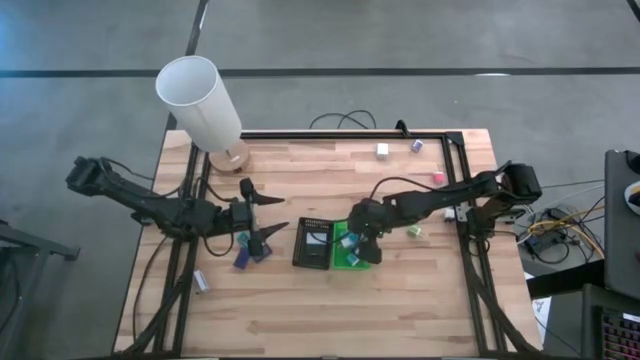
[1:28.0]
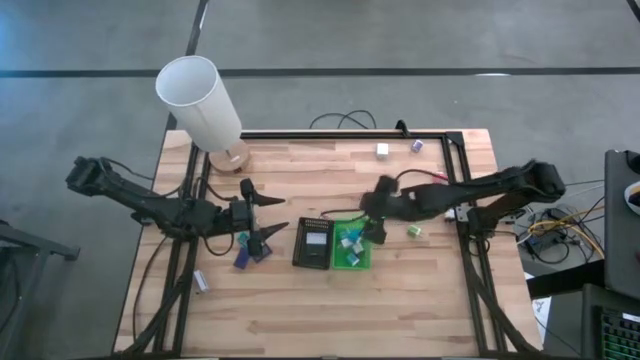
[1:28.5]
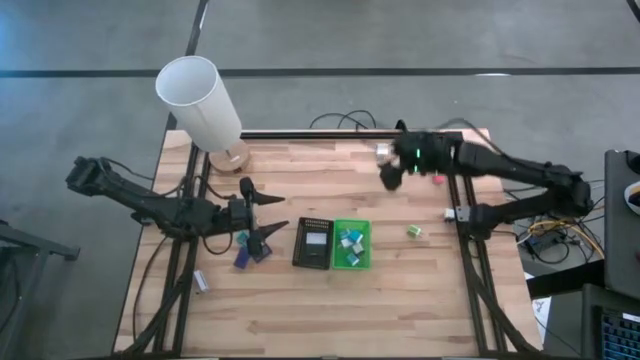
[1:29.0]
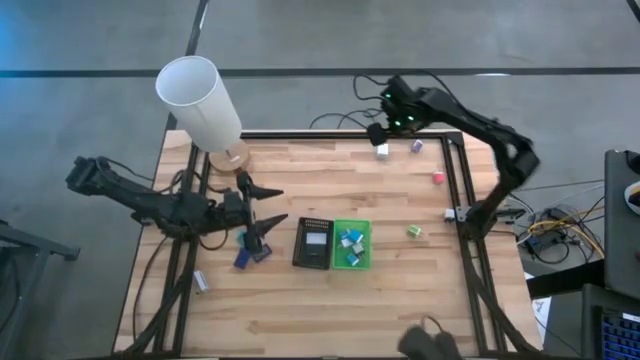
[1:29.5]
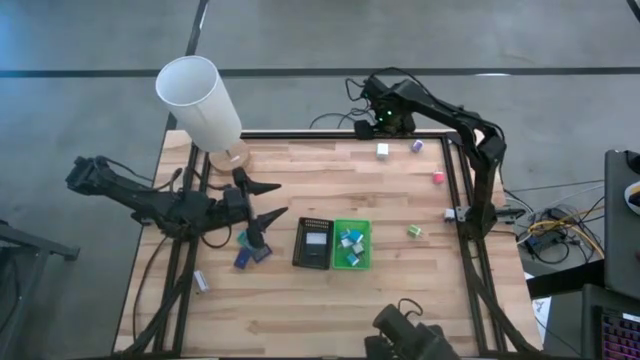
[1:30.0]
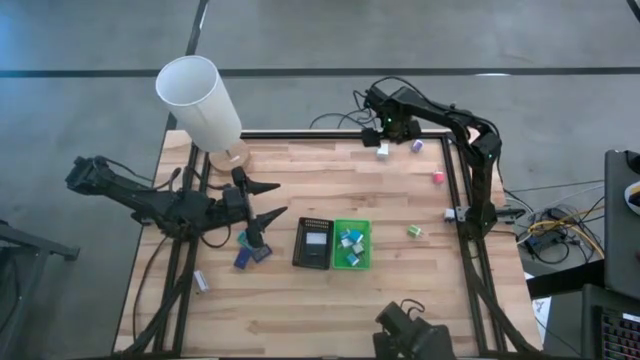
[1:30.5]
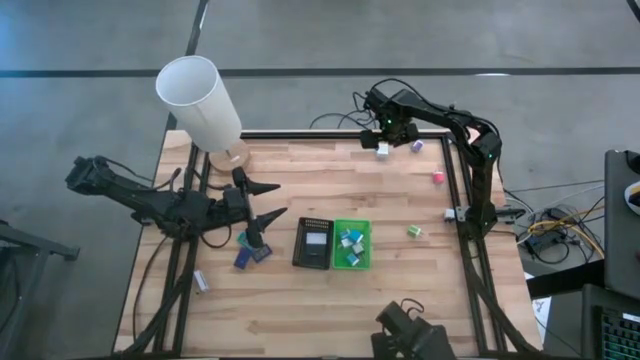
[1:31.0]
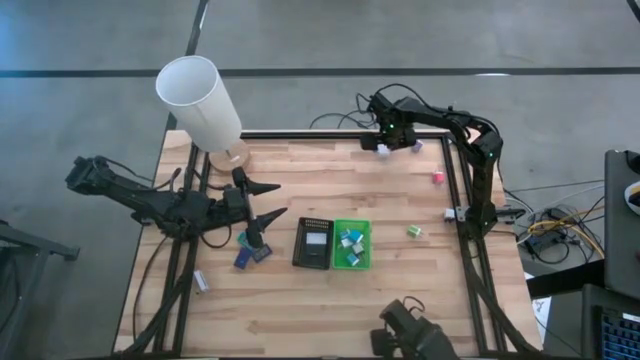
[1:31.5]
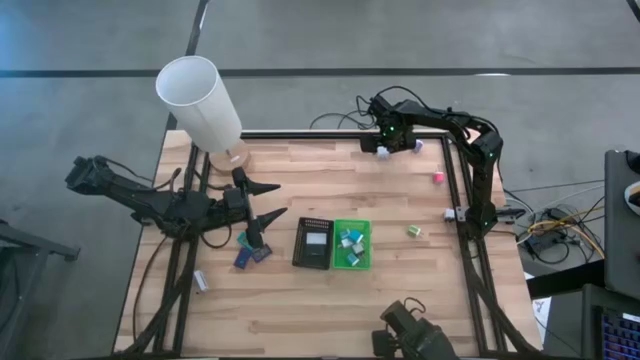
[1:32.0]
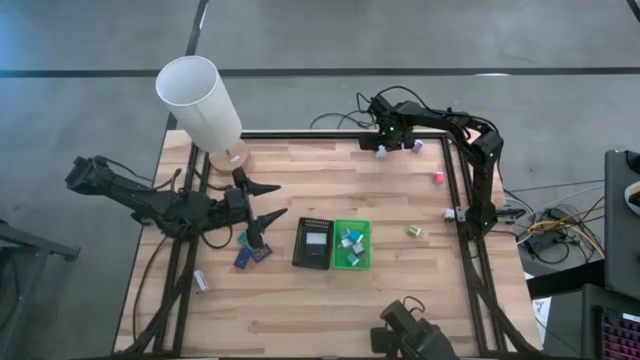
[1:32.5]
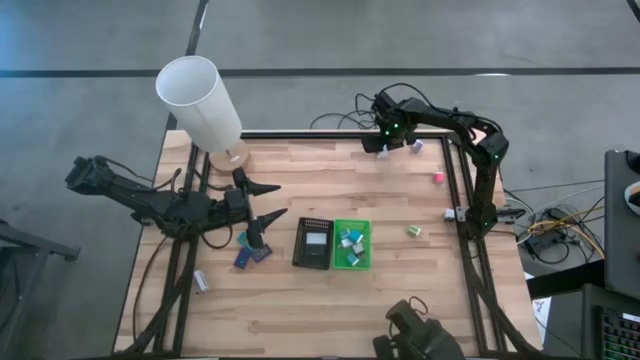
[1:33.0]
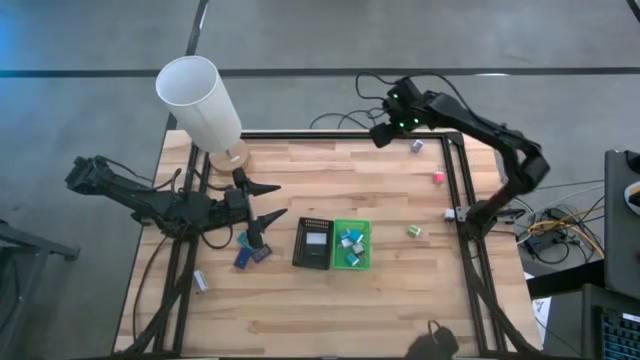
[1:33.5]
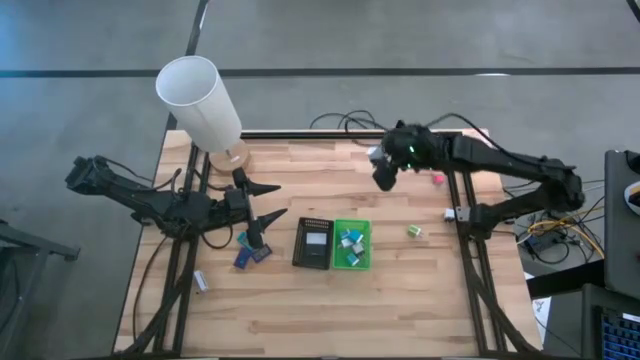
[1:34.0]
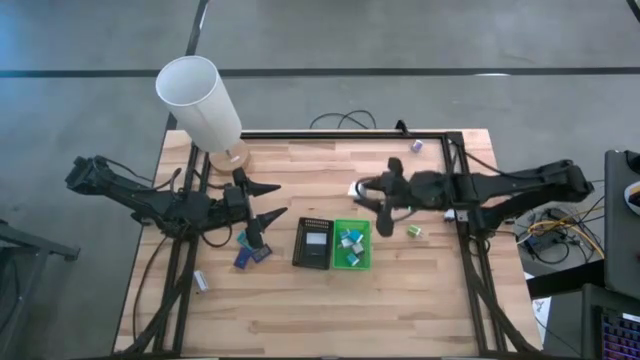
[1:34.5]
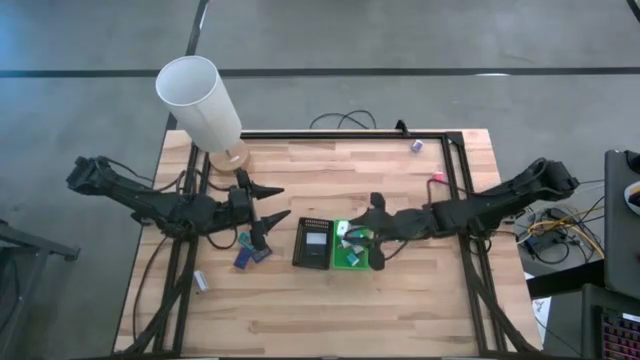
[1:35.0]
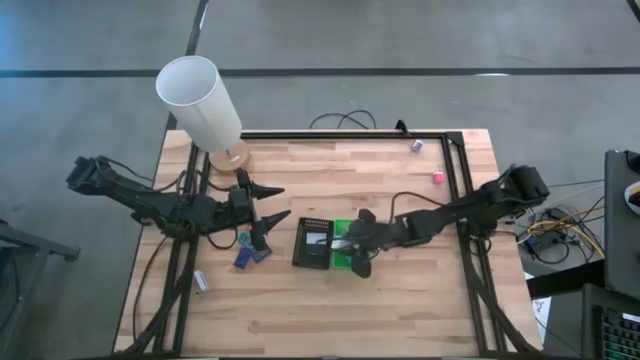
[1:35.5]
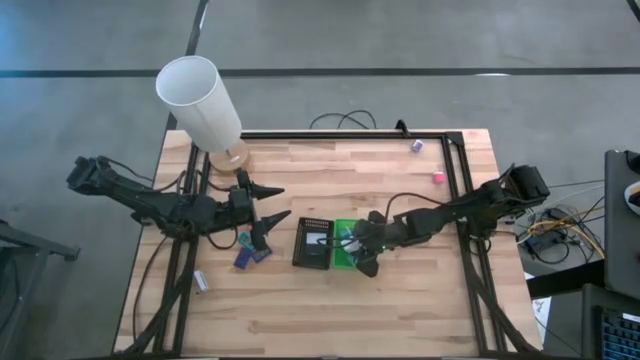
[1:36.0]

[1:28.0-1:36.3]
Task: Pick & Place Office items
Put the white charger adapter into the green basket

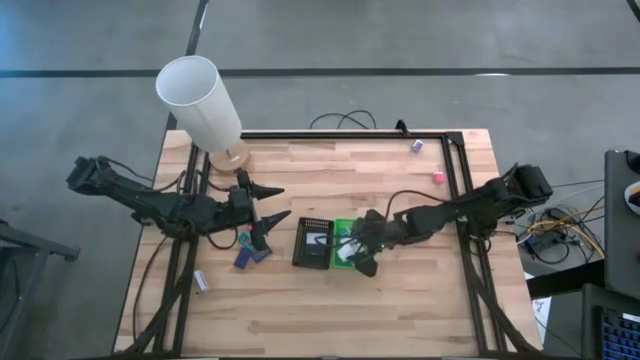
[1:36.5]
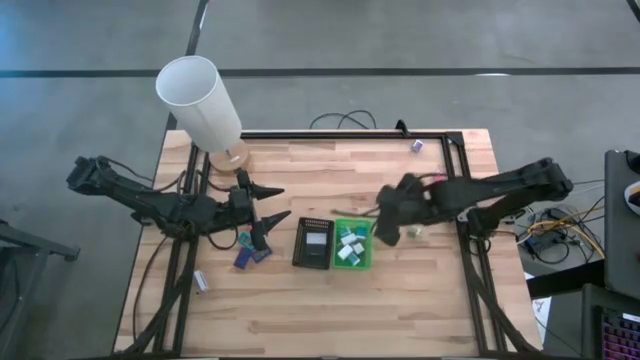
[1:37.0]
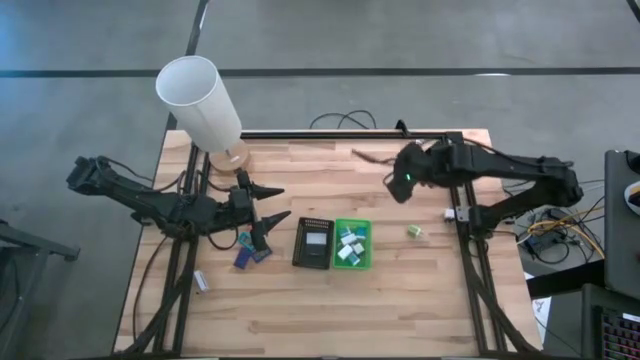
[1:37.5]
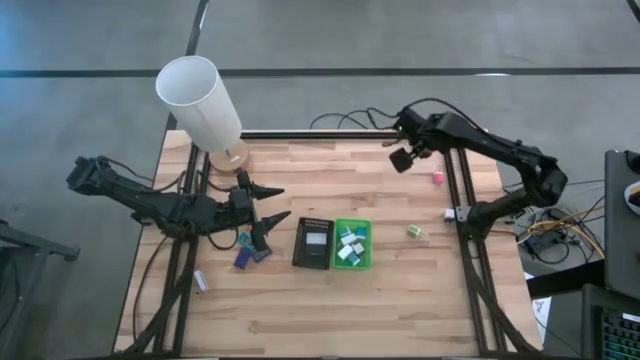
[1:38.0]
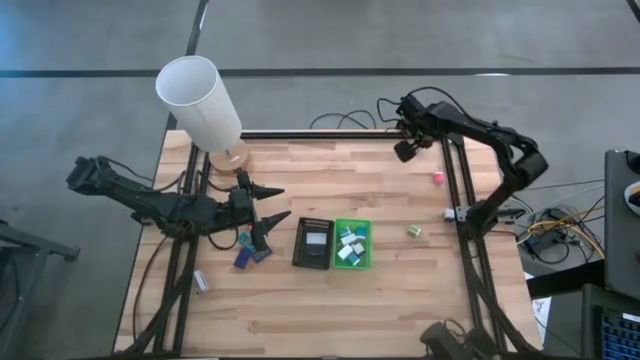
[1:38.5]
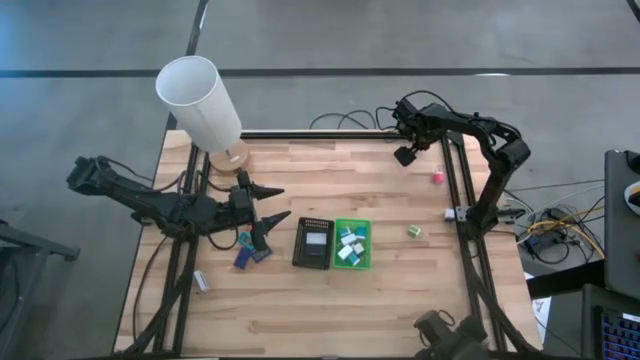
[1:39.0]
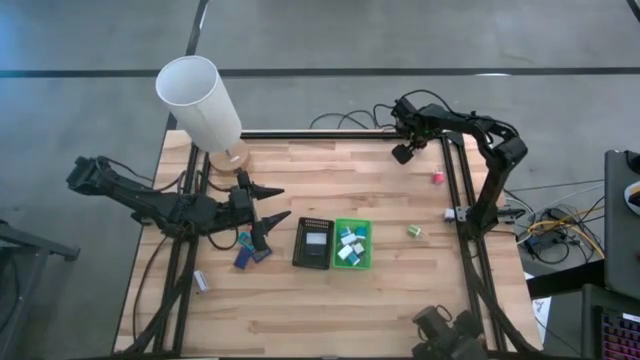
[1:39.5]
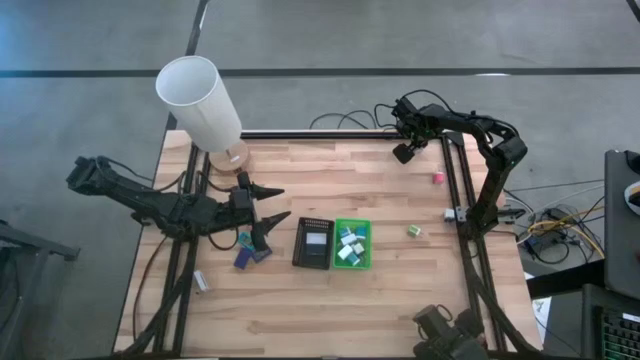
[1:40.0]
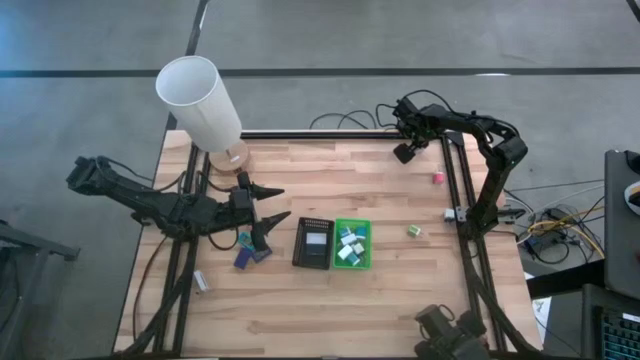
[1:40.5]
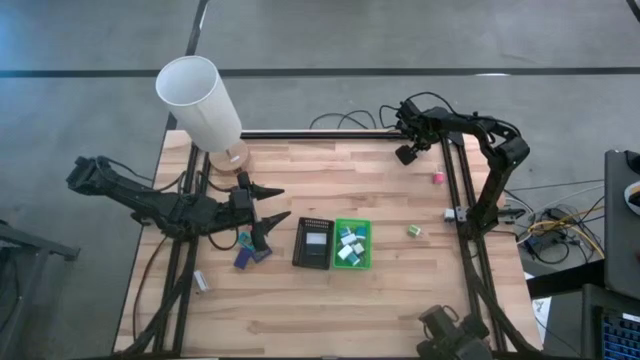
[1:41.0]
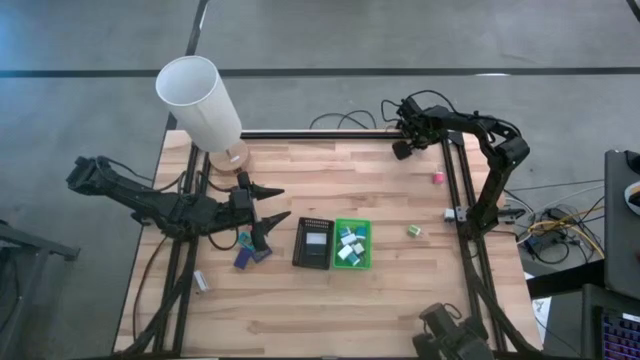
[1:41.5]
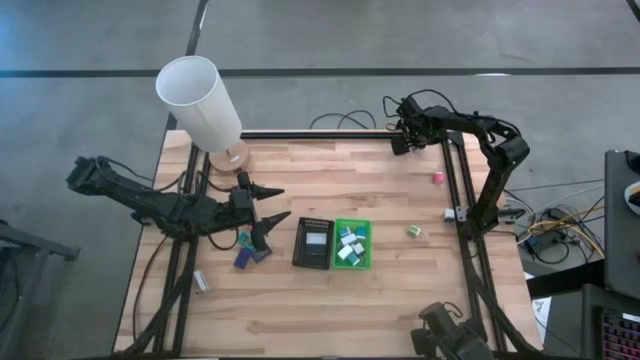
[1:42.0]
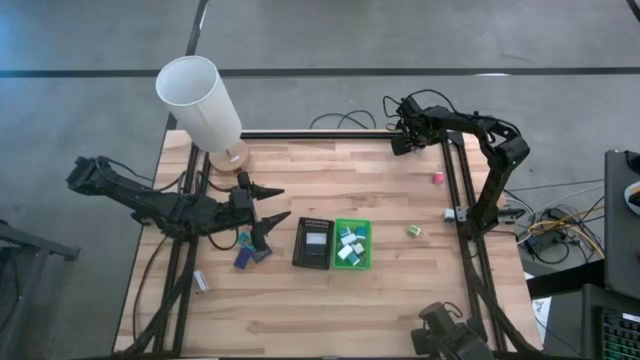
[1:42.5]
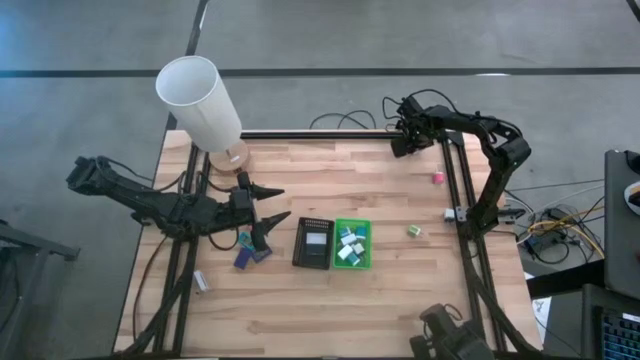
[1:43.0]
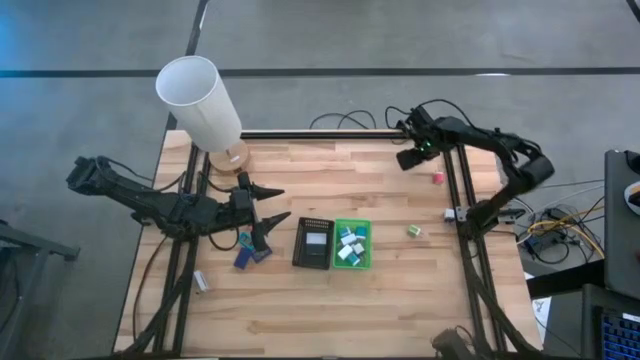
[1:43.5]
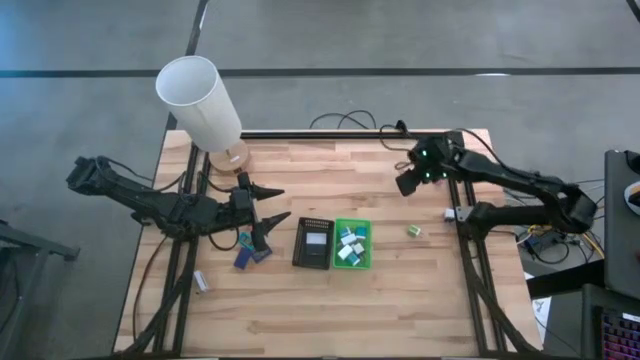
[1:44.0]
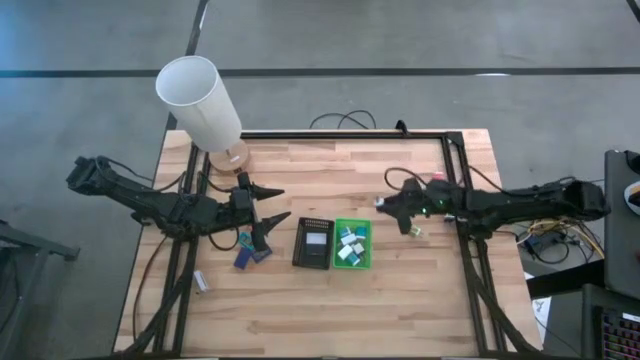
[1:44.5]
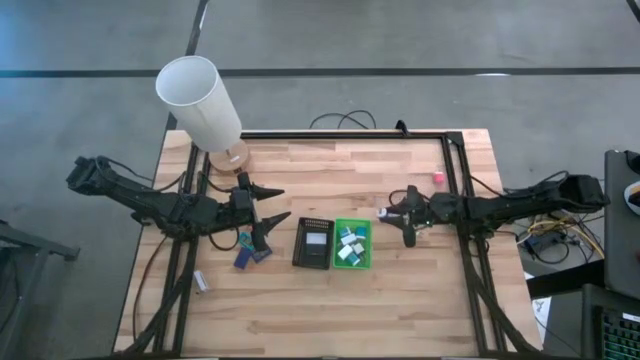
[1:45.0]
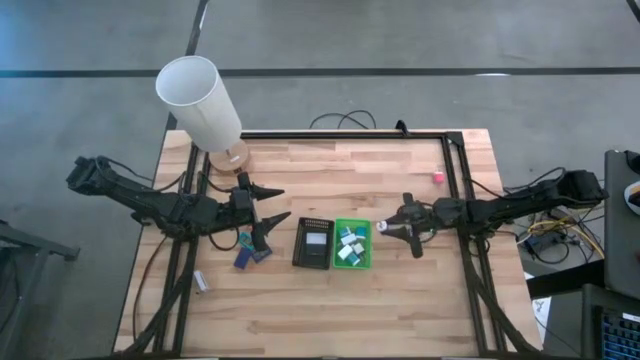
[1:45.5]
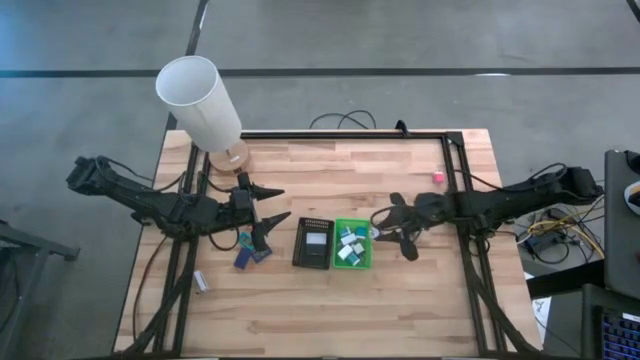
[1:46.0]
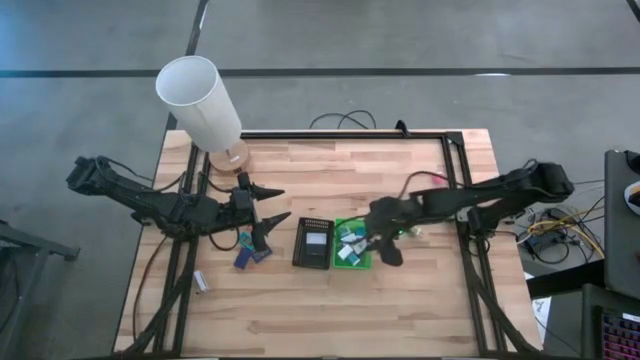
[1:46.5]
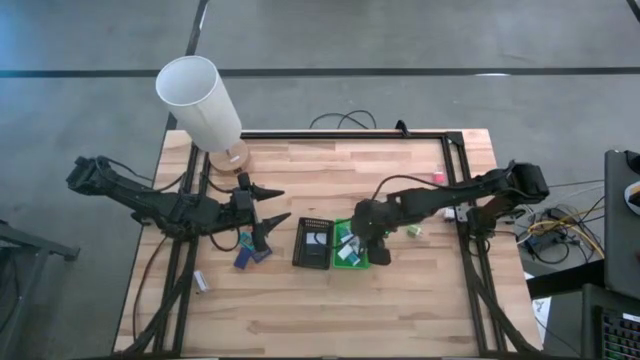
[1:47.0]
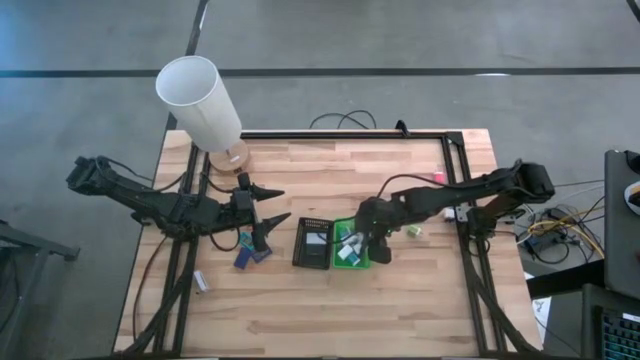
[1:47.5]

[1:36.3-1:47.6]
Put the purple charger adapter into the green basket
